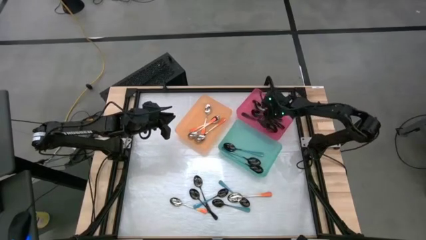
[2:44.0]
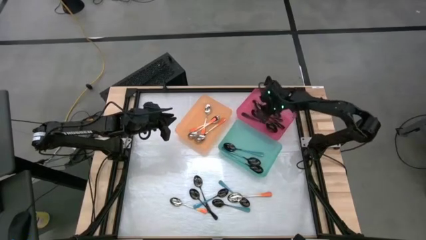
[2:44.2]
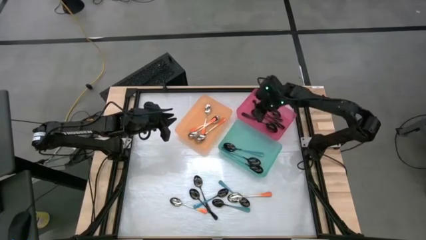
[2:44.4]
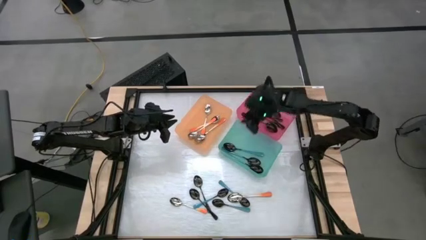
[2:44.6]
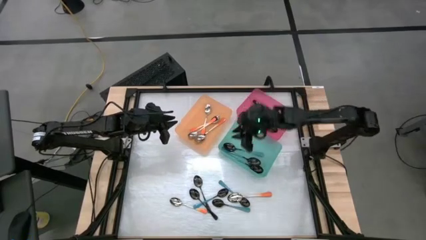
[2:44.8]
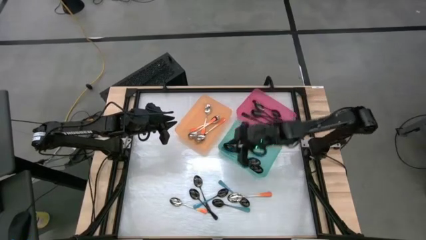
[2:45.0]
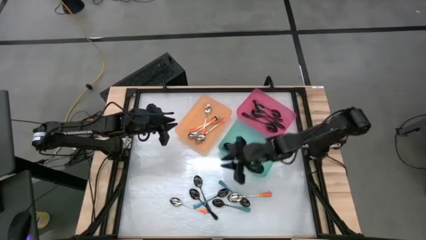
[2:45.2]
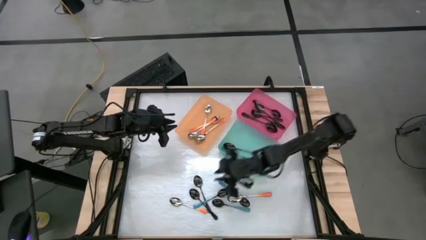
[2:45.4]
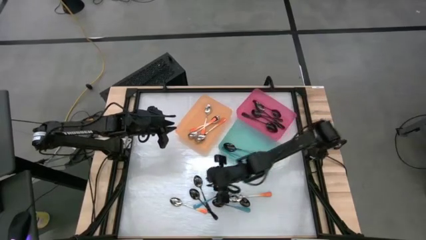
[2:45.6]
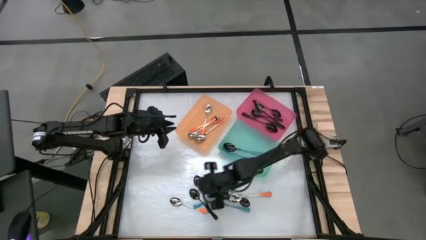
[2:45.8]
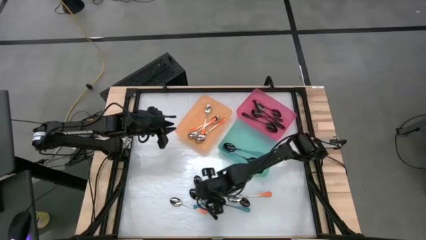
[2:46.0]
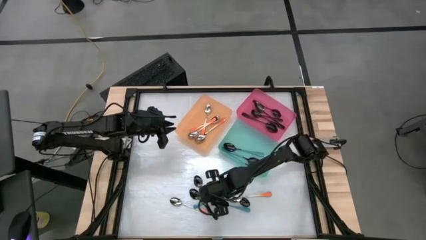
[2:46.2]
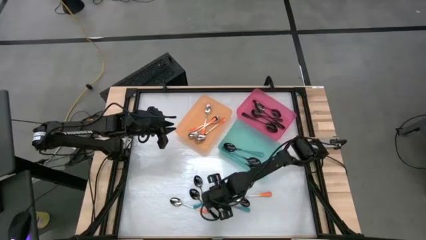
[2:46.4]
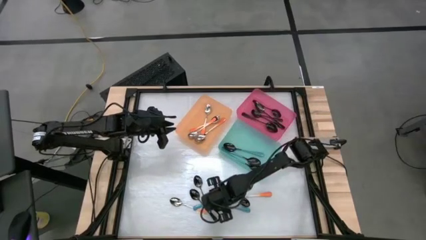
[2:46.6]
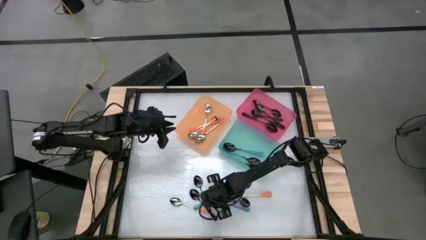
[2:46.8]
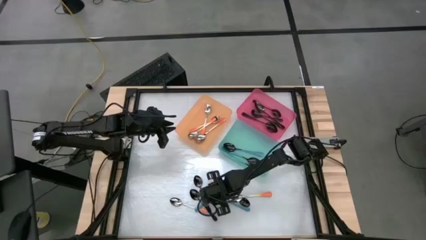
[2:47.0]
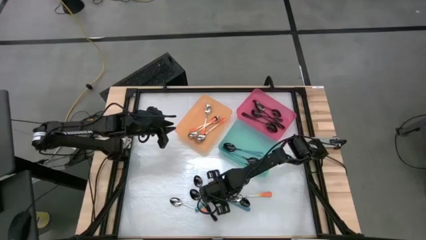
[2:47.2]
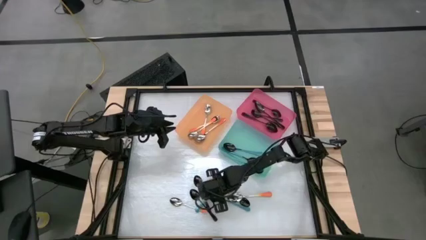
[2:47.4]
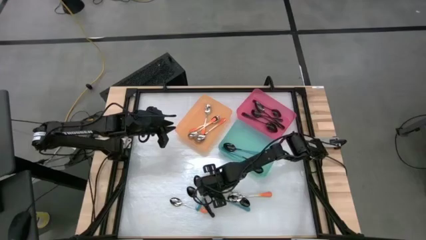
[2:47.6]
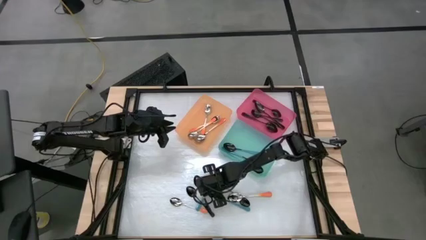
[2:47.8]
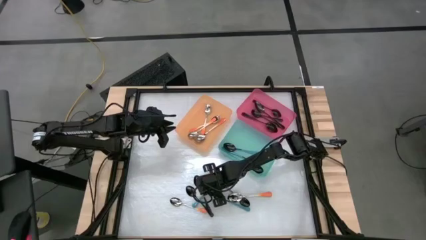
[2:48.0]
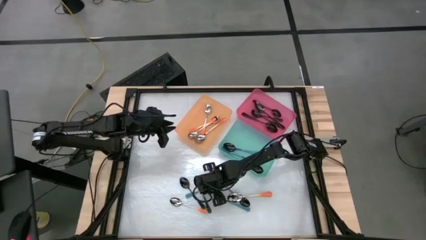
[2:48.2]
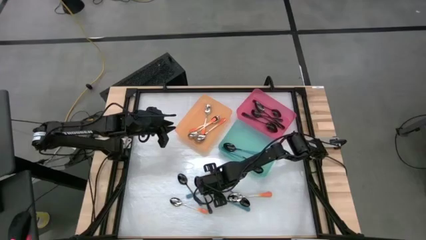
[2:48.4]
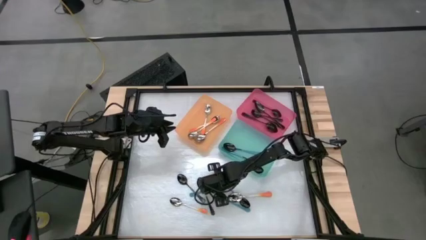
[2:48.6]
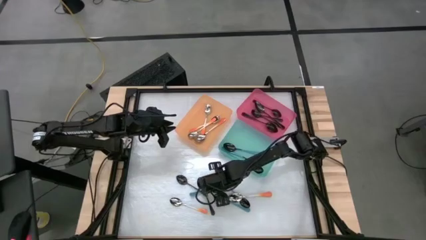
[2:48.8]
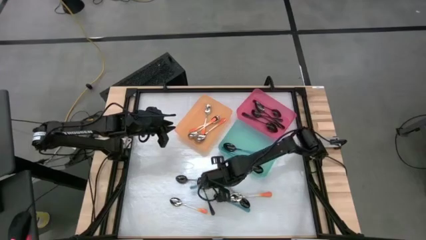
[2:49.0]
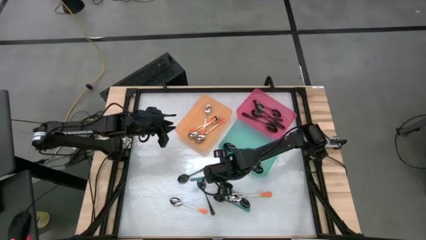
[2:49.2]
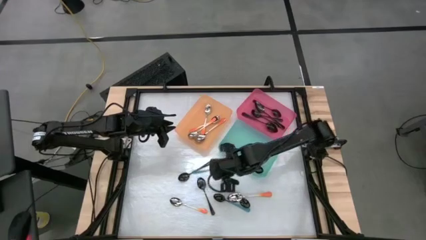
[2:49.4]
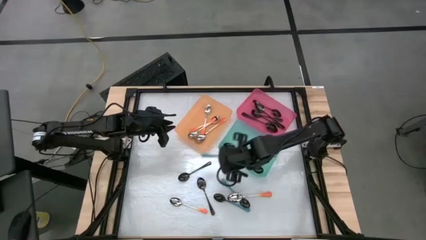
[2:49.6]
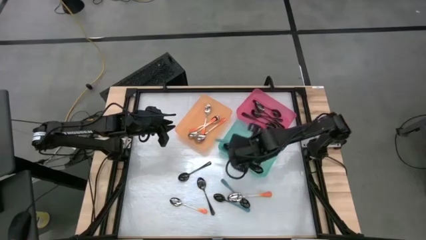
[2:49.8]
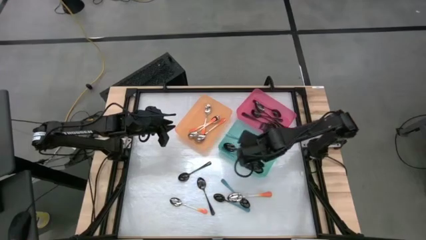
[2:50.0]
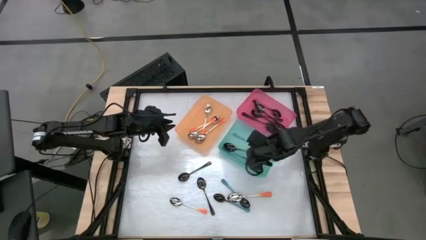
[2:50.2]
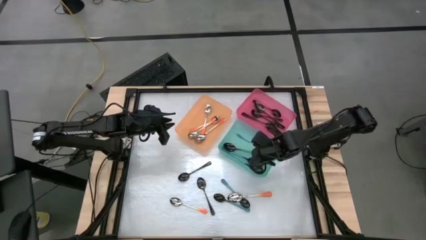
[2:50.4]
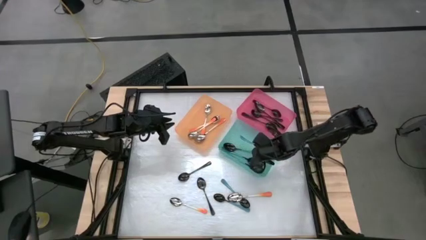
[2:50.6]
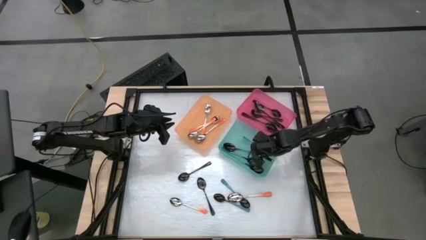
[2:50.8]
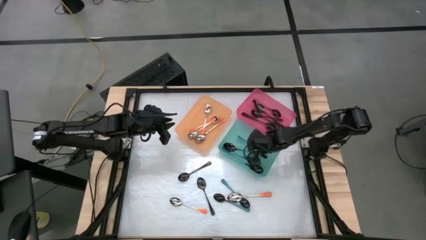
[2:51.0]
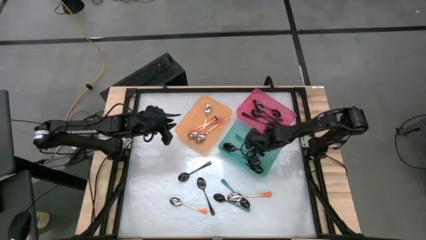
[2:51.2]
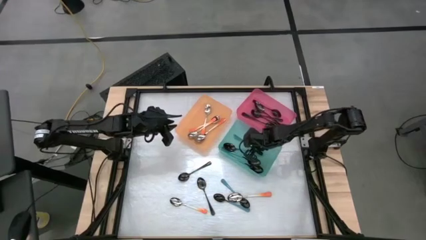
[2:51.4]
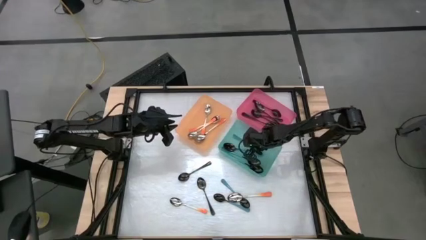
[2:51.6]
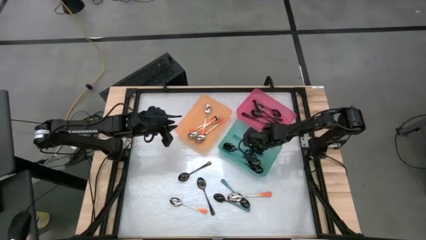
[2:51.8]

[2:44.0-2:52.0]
Task: Sort silverware by color (type)
Put the blue spoon into the blue bin

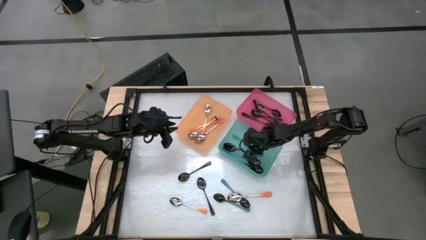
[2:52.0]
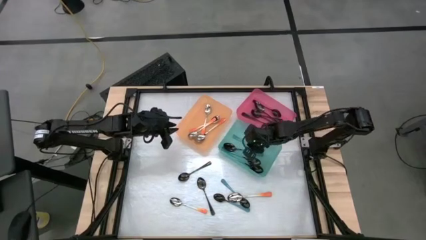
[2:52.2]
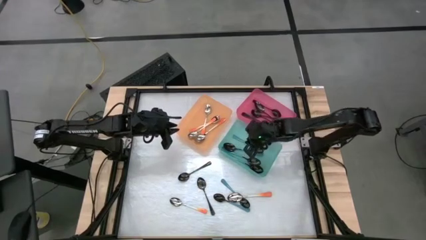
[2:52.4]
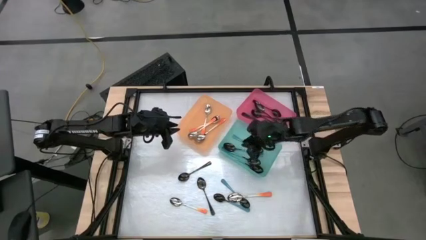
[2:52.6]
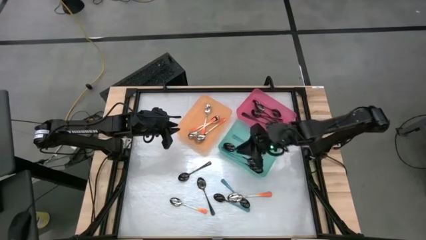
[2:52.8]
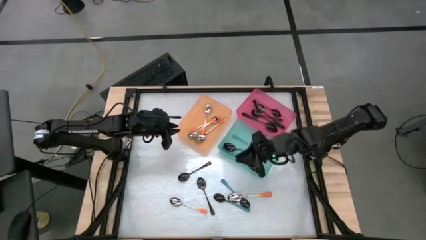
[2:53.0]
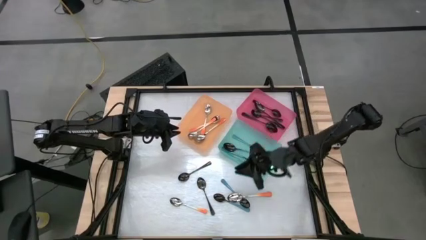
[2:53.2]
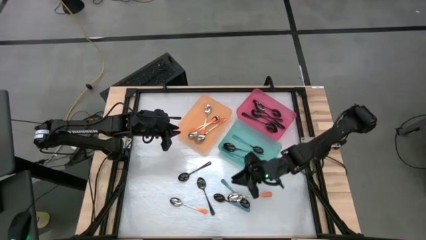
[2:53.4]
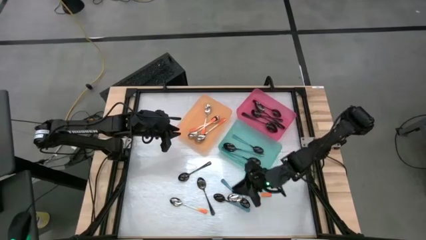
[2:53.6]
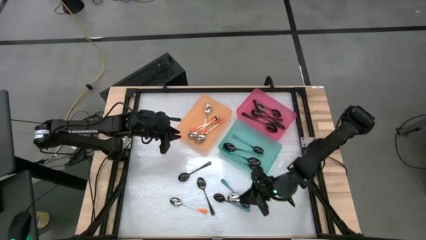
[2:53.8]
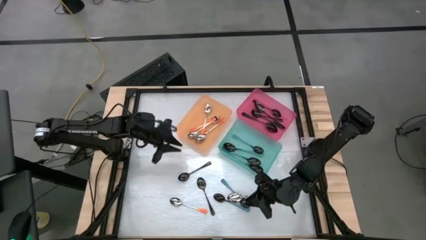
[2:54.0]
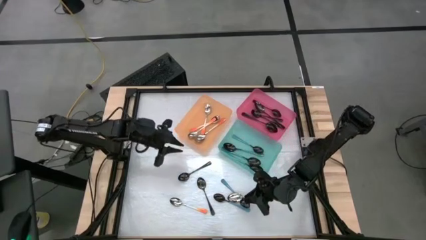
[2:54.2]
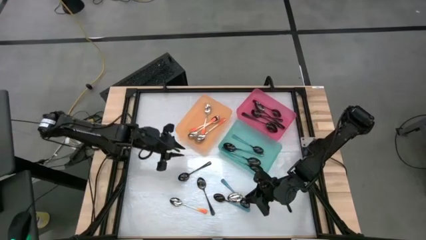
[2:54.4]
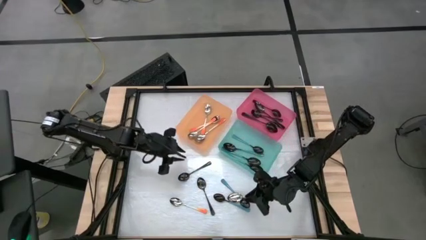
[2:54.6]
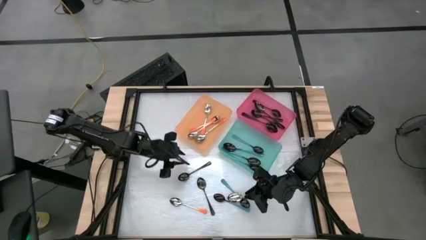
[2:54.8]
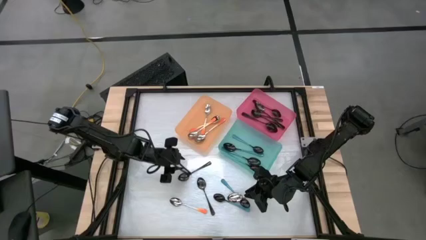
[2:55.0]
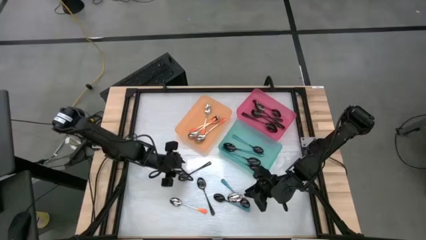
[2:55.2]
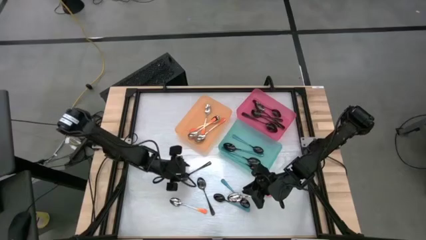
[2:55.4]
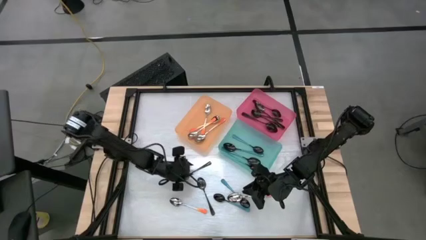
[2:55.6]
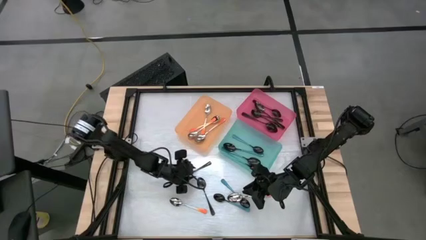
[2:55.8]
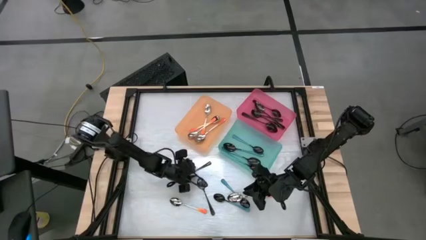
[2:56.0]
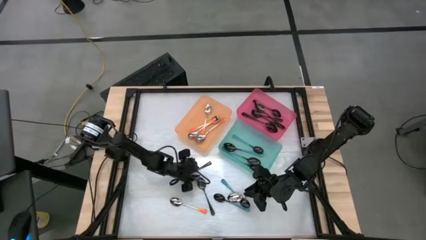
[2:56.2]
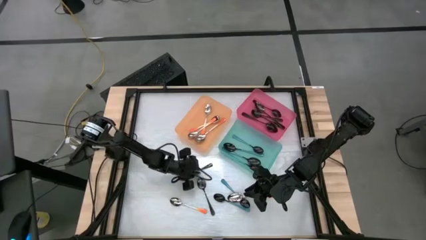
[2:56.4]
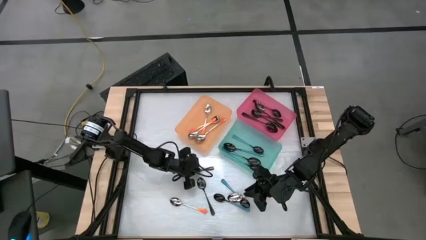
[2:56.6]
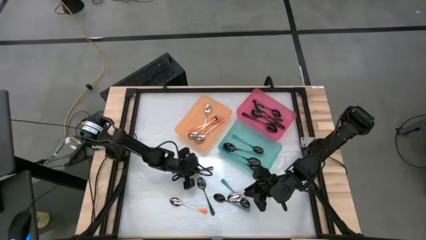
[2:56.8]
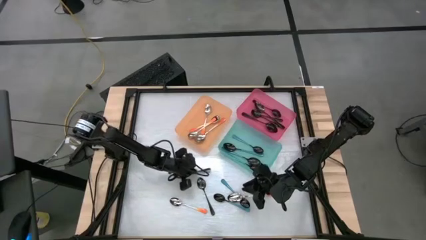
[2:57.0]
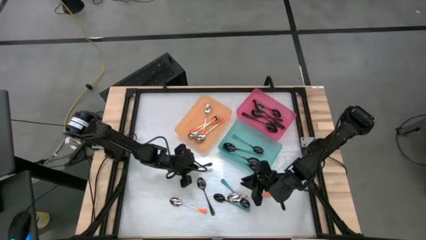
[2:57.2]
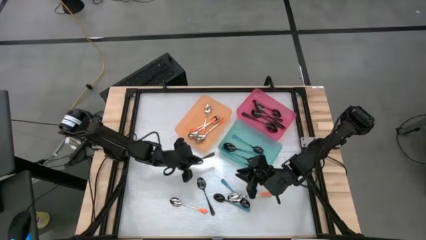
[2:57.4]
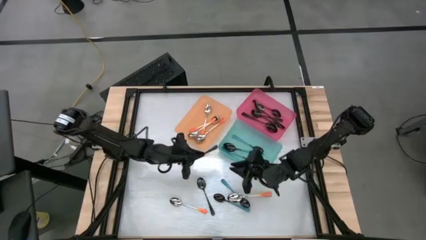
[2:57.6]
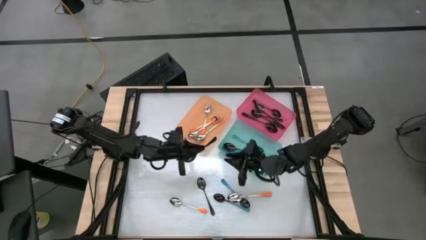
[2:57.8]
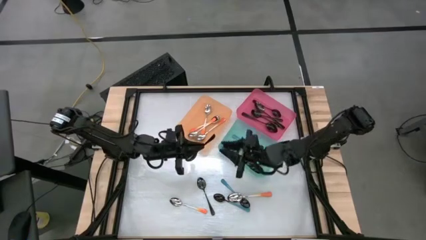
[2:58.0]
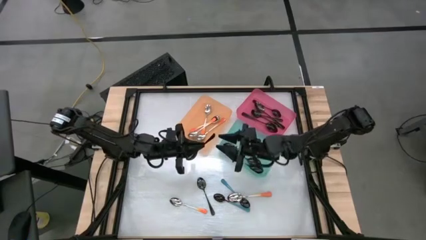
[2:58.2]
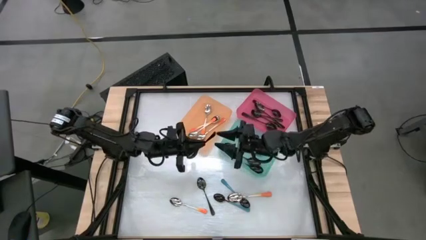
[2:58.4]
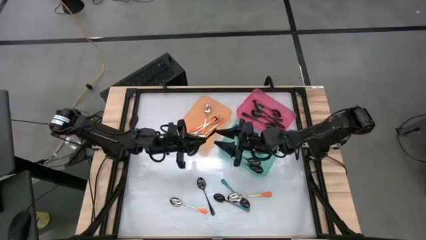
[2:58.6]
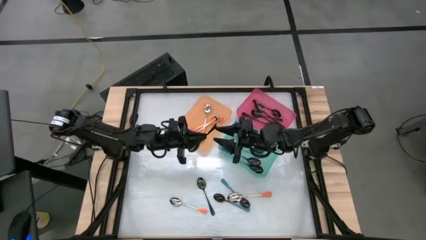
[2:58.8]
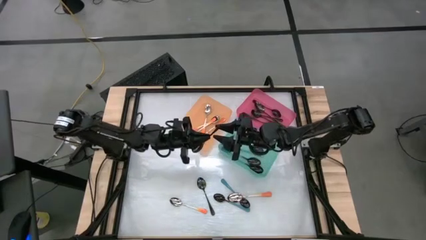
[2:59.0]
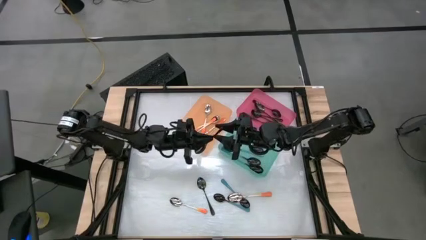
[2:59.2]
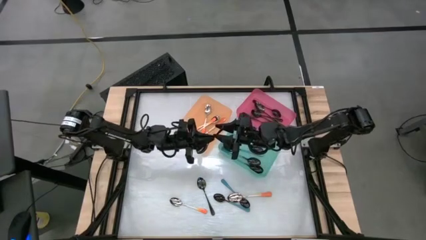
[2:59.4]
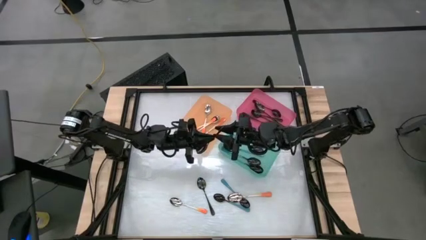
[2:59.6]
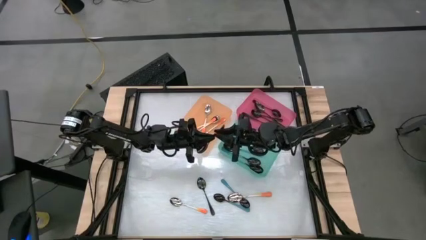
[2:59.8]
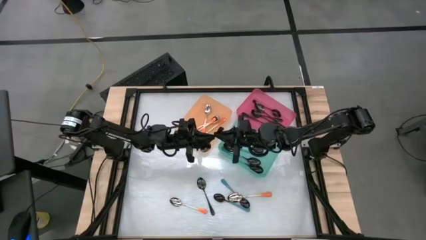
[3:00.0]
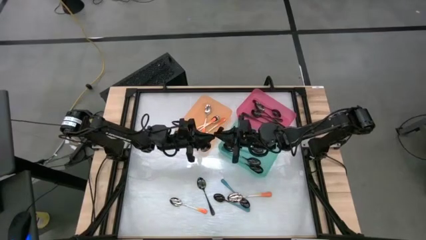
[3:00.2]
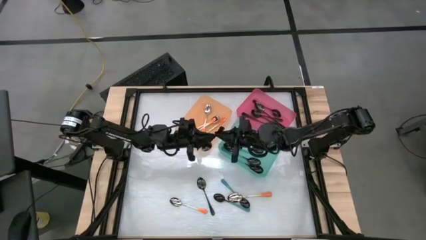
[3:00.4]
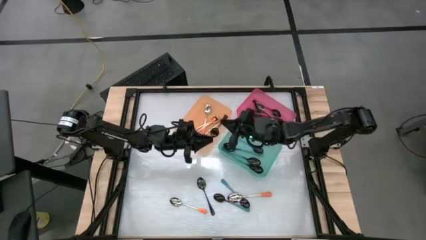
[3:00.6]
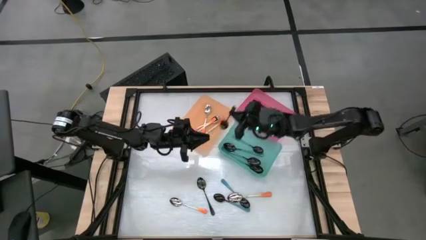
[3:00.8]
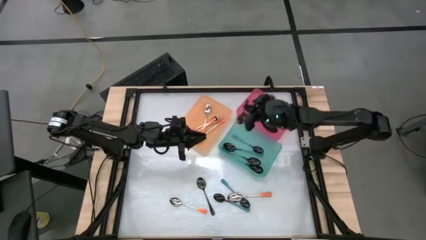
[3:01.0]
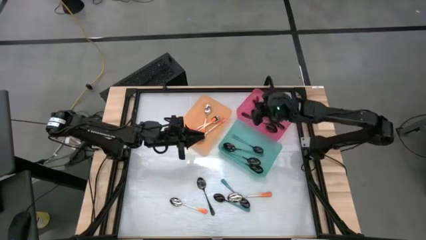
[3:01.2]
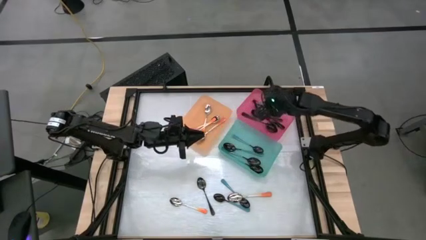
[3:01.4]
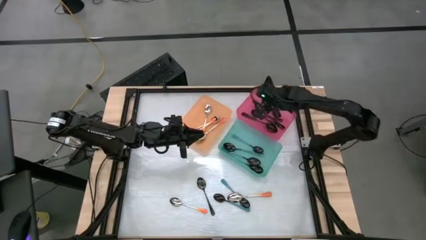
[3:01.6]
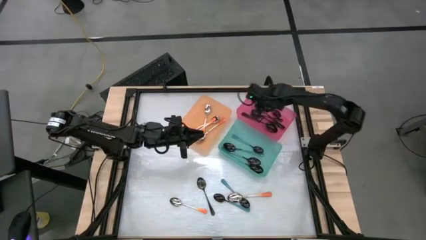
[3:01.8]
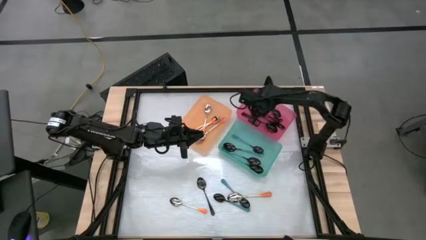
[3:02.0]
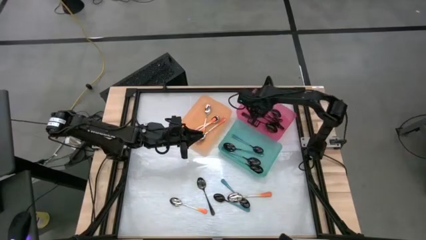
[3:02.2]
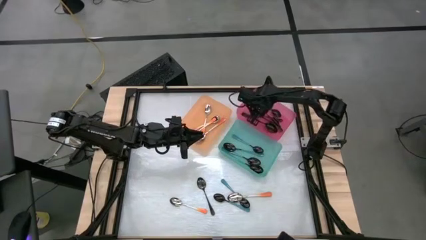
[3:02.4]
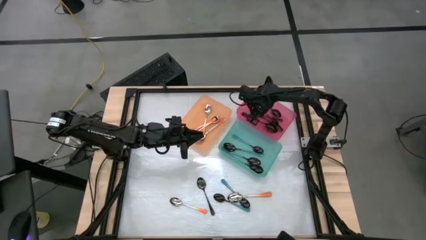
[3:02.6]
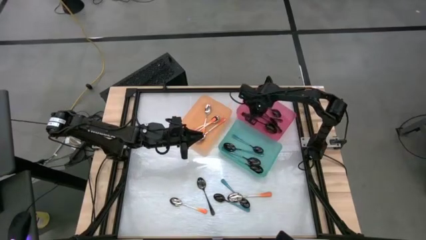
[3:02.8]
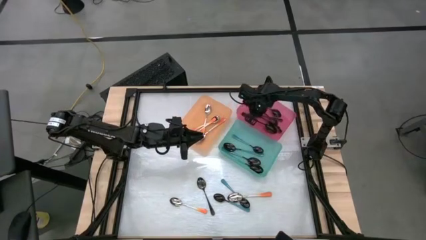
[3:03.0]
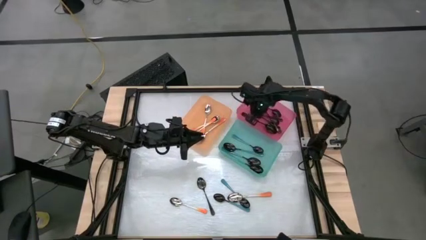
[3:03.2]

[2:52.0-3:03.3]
Put the black spoon into the pink bin
